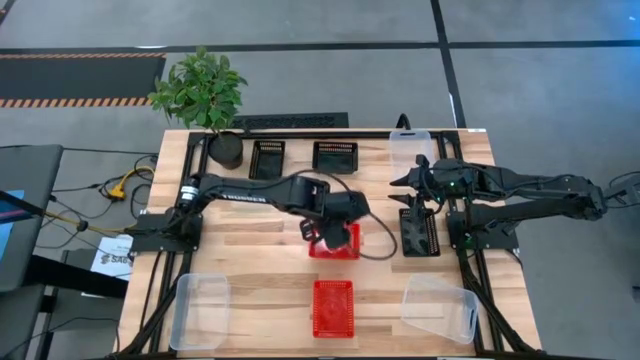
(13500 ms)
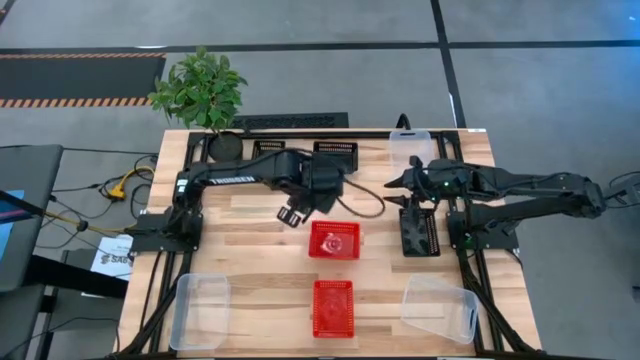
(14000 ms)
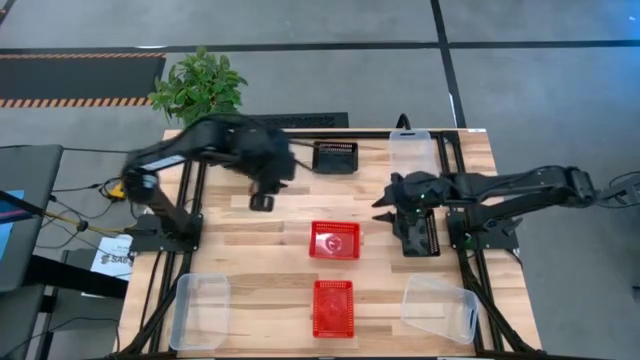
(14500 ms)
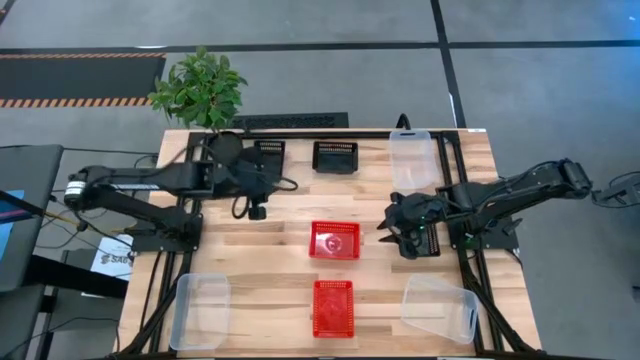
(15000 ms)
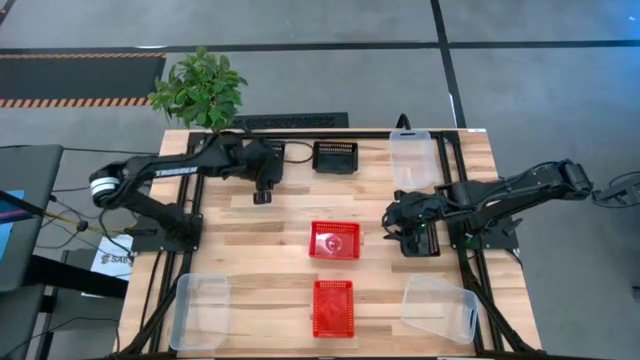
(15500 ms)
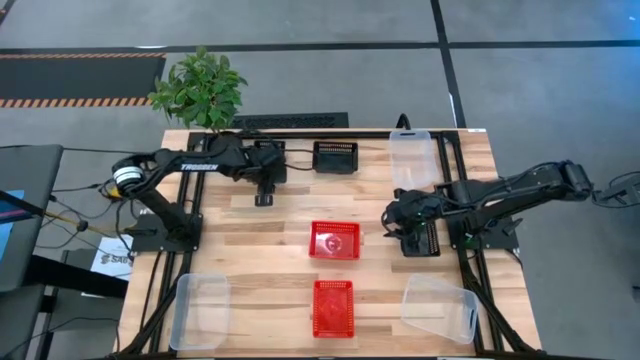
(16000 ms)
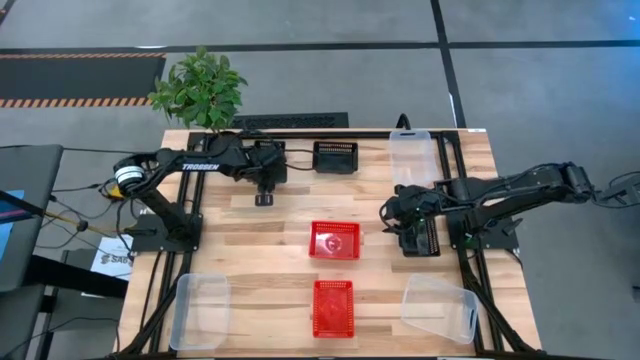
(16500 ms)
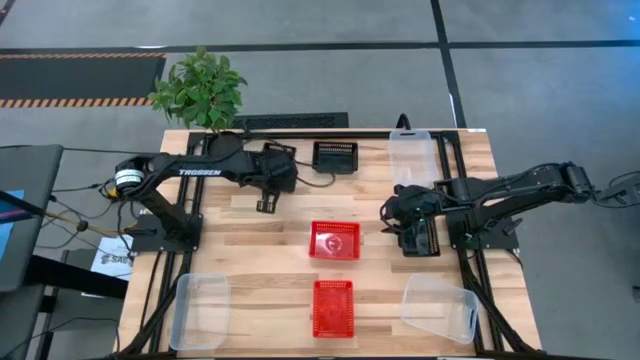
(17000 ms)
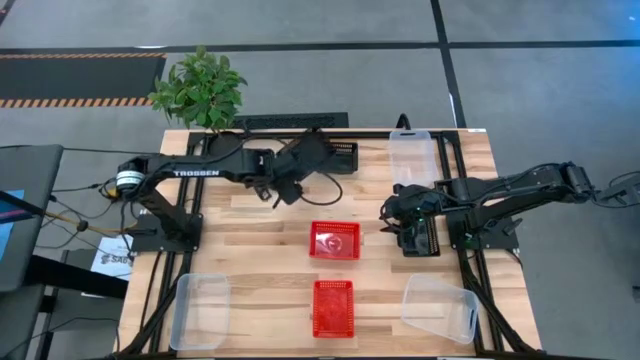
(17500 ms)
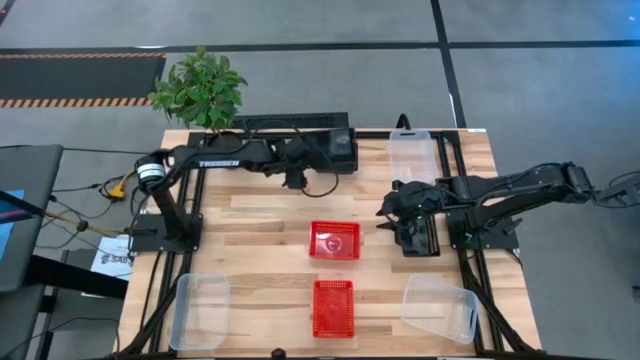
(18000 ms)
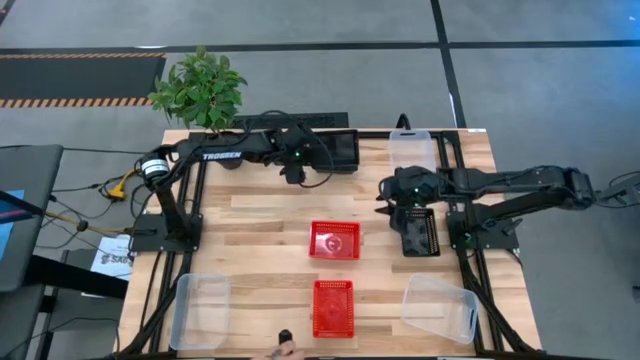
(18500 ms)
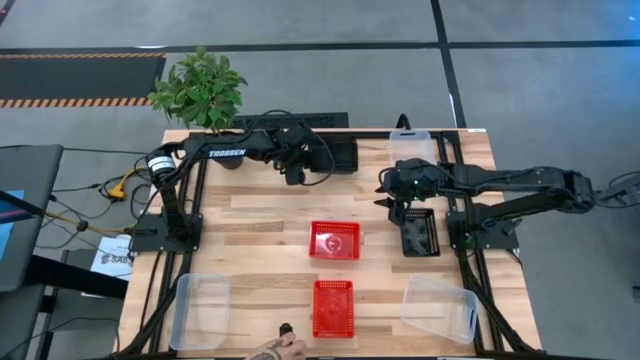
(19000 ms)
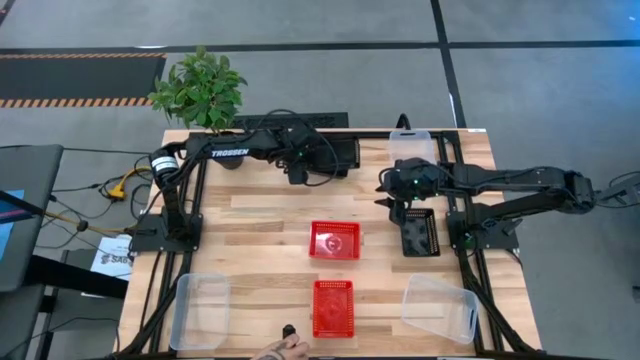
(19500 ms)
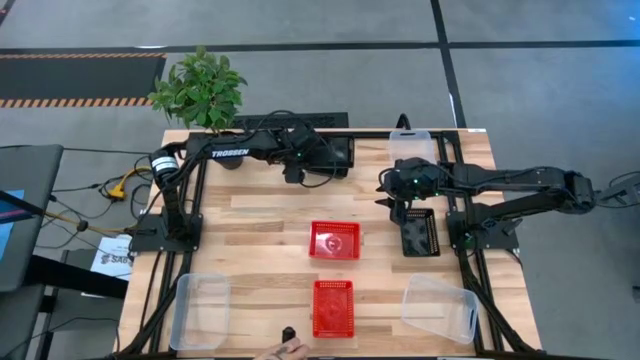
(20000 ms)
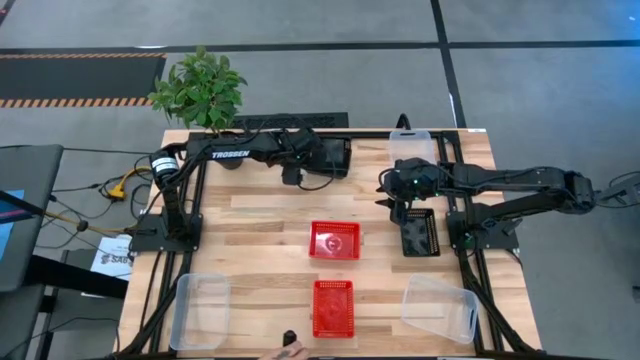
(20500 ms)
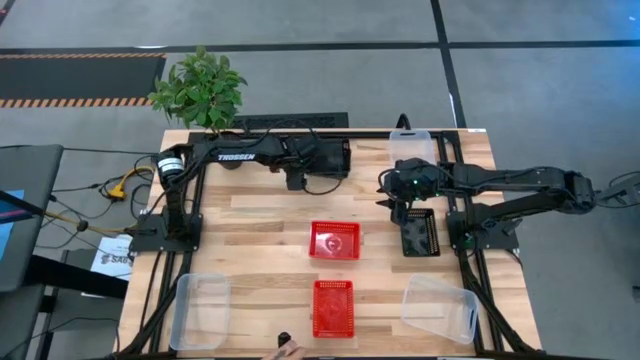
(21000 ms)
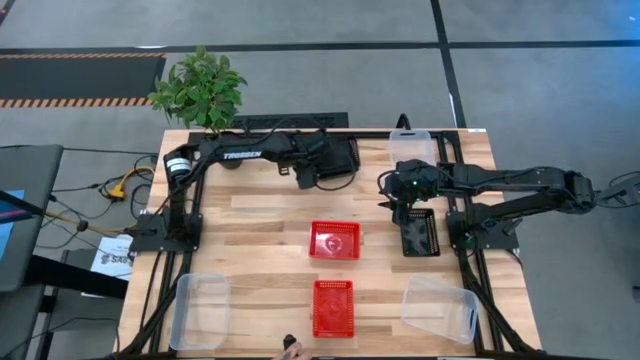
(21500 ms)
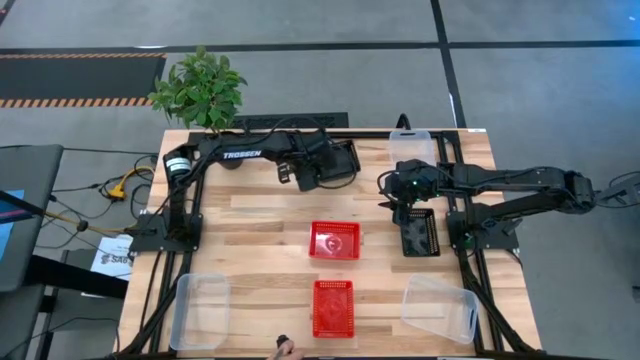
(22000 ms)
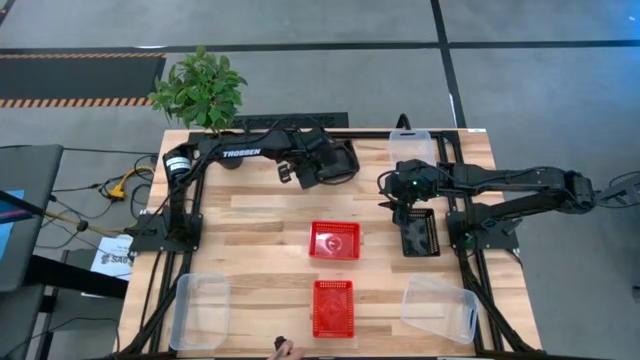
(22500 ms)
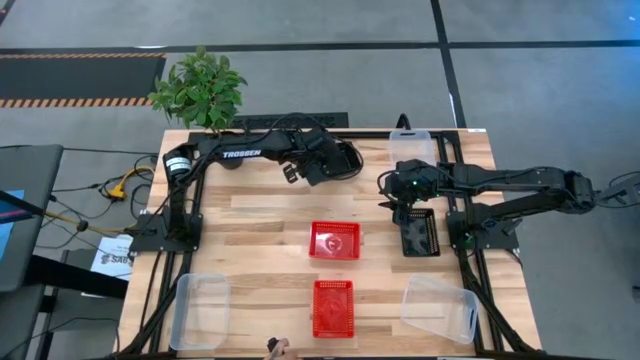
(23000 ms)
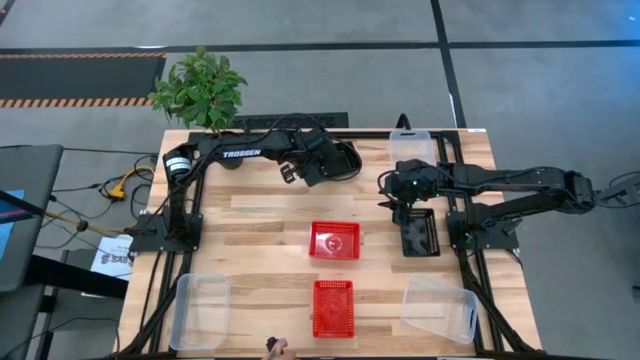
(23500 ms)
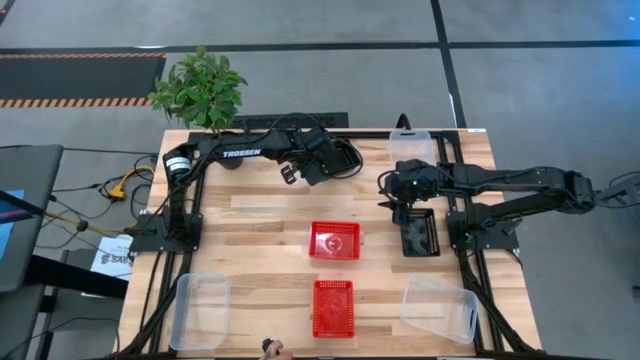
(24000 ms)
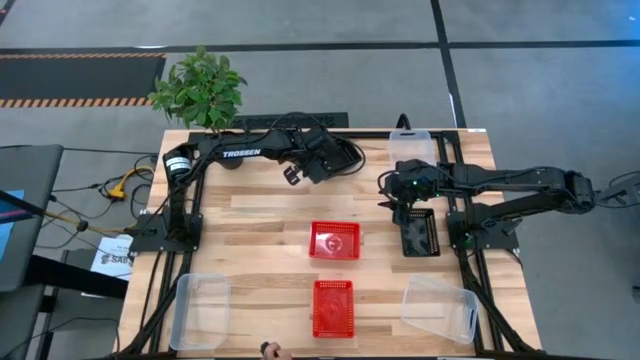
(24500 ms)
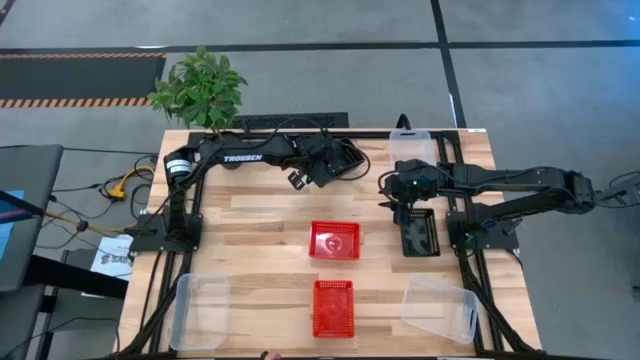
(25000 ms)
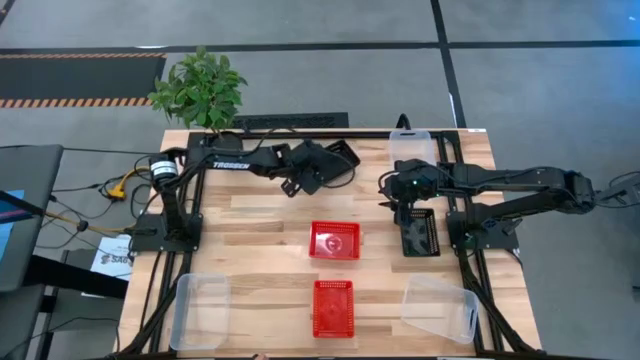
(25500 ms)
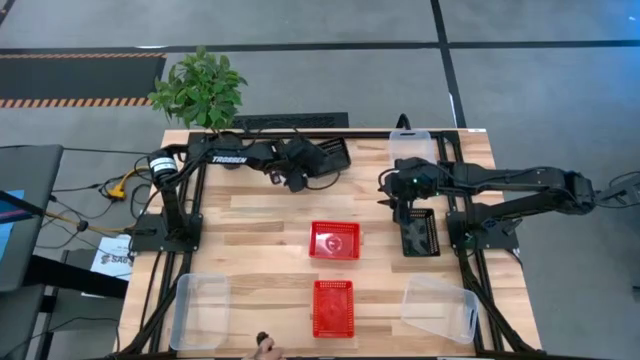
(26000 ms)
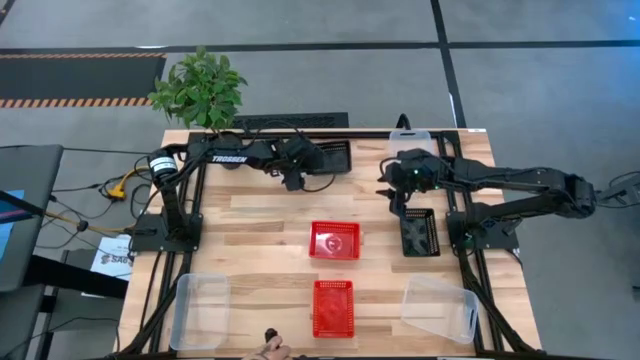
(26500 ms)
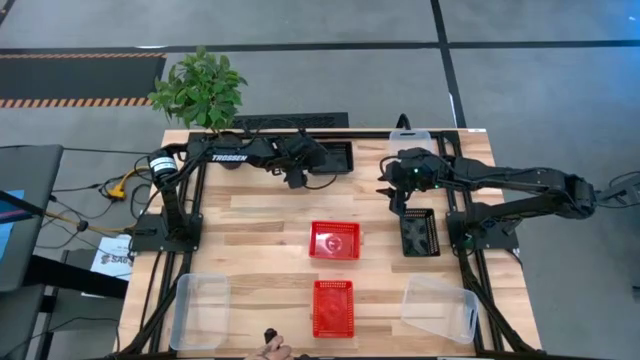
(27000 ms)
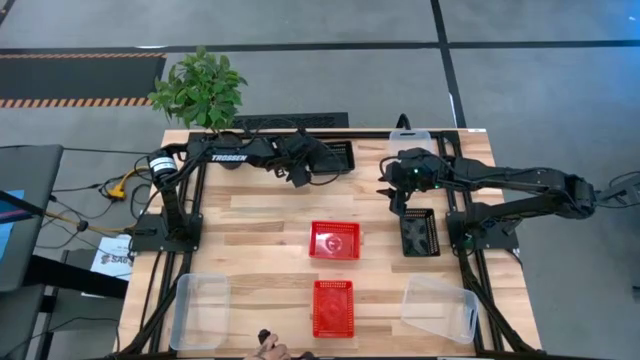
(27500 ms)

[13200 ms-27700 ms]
Stack the top left black bin on top of the top right black bin

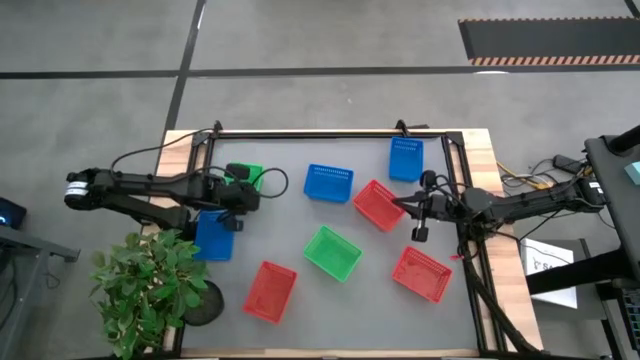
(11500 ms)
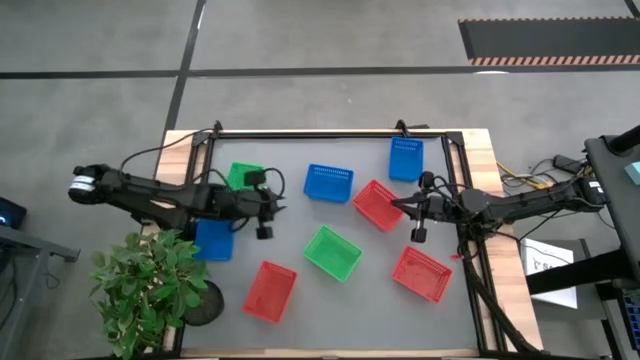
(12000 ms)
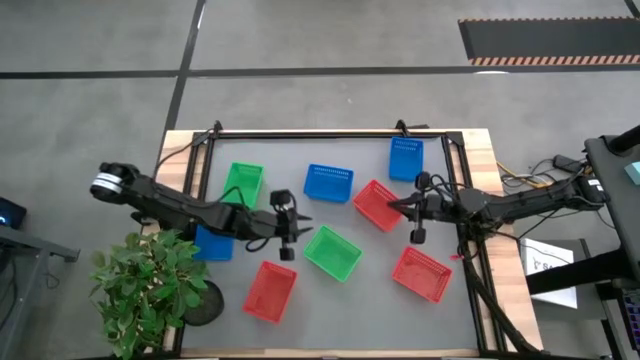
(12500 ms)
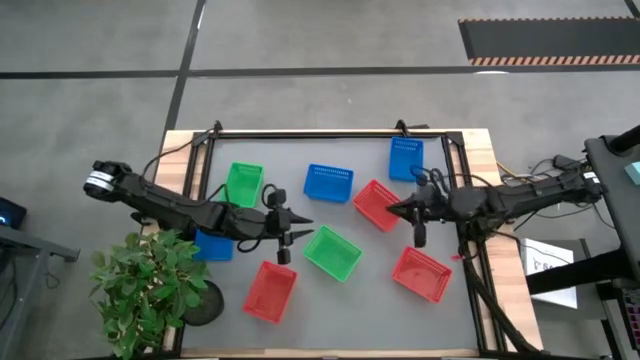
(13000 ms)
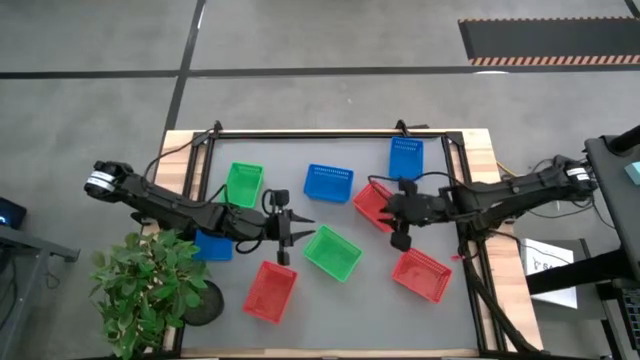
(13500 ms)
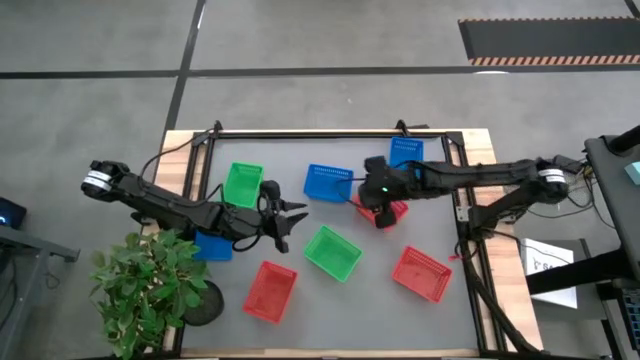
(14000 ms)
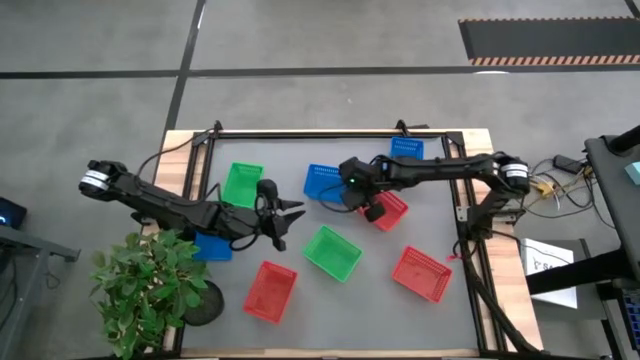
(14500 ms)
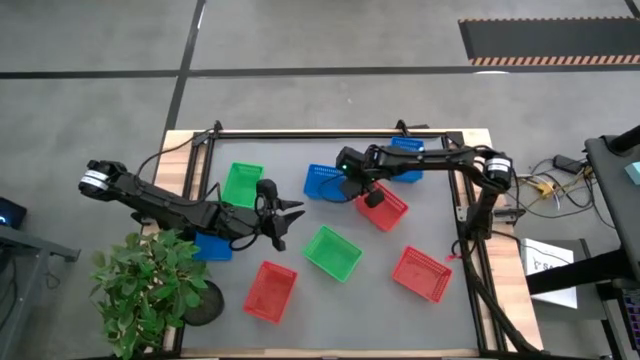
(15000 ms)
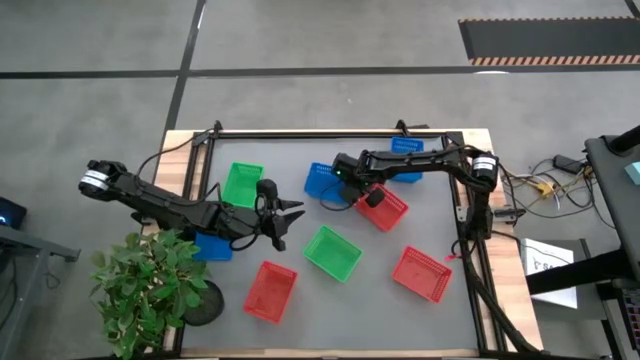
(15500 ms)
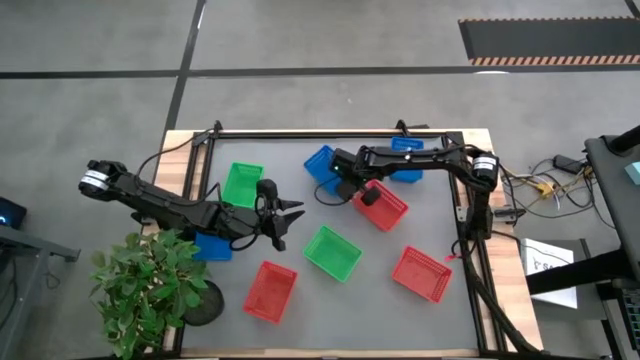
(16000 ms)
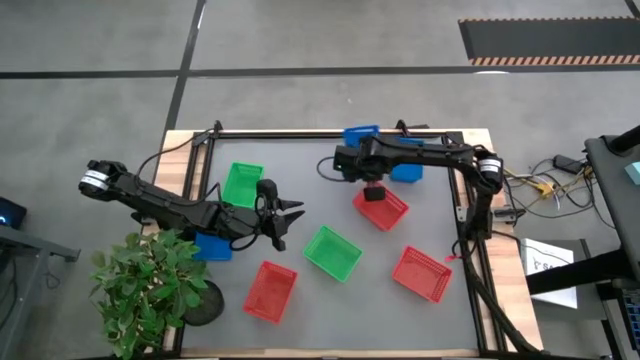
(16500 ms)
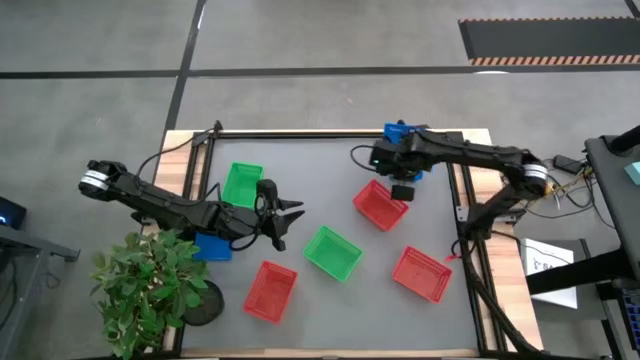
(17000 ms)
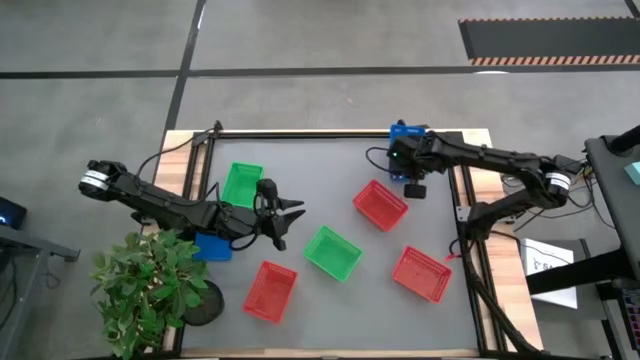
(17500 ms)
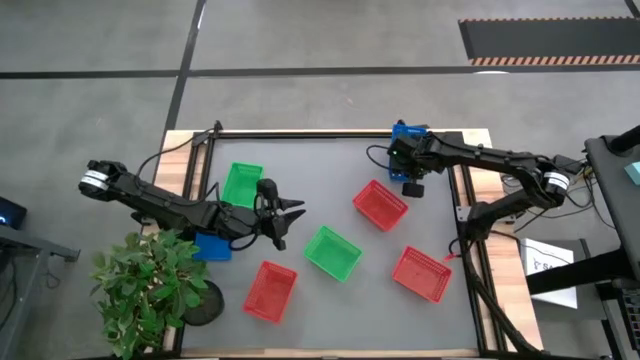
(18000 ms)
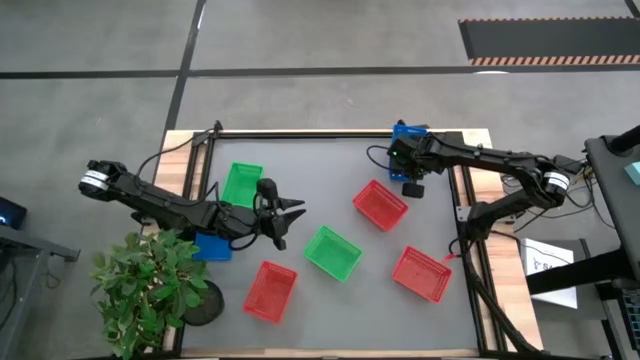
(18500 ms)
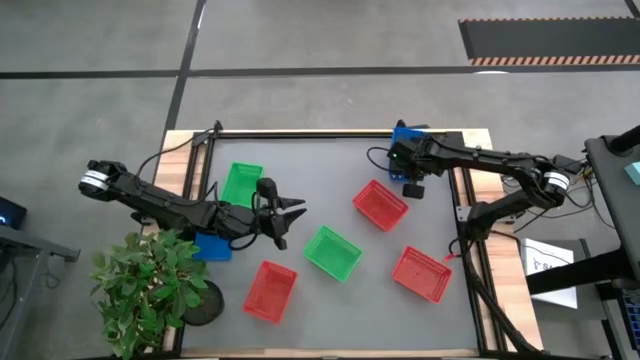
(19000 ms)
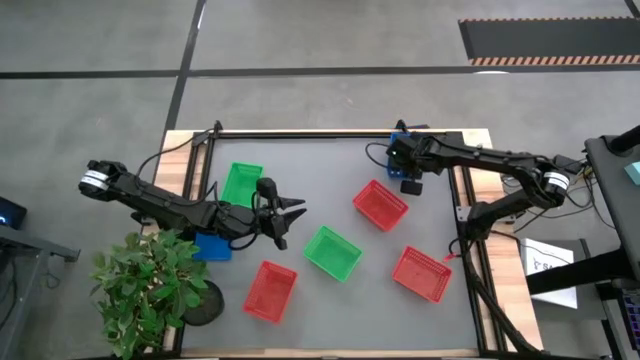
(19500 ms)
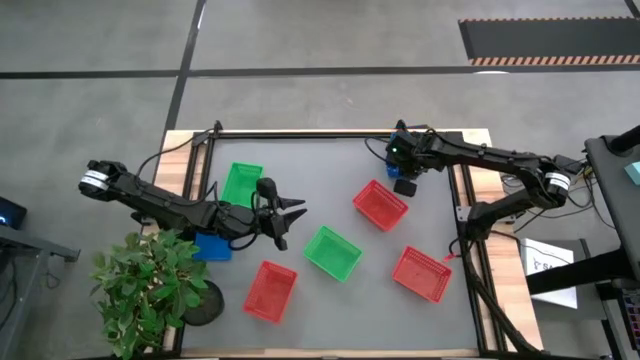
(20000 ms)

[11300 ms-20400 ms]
Stack the top left blue basket on the top right blue basket
